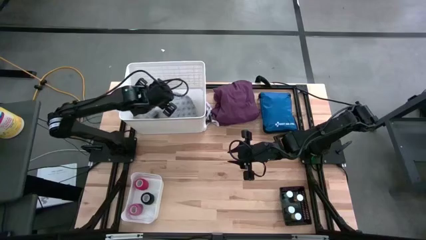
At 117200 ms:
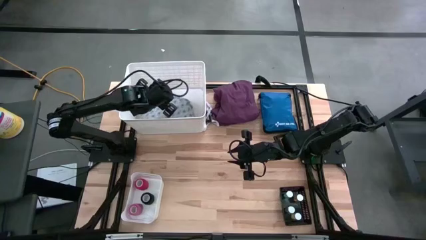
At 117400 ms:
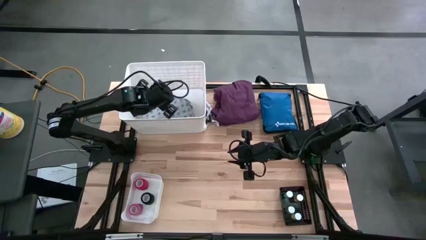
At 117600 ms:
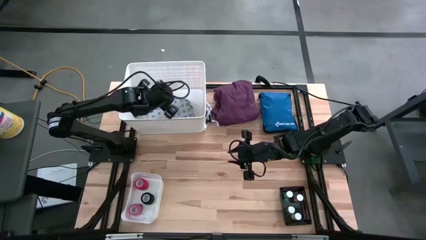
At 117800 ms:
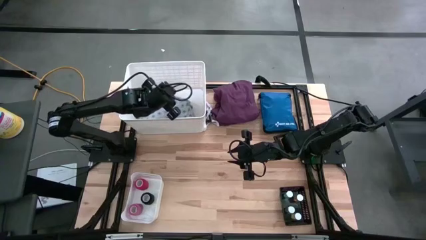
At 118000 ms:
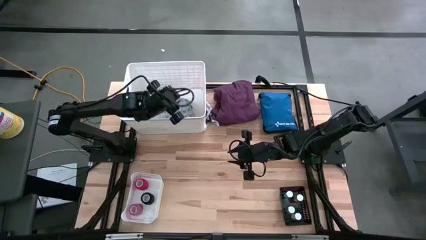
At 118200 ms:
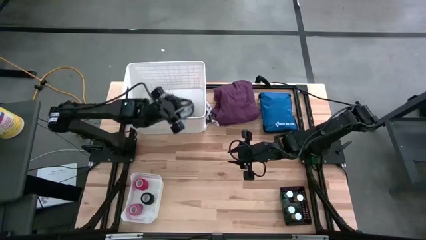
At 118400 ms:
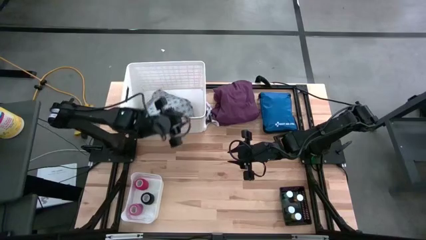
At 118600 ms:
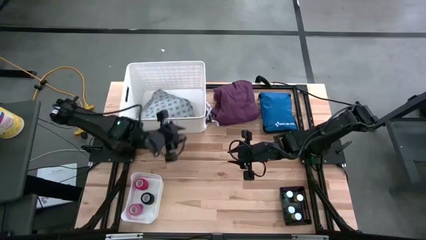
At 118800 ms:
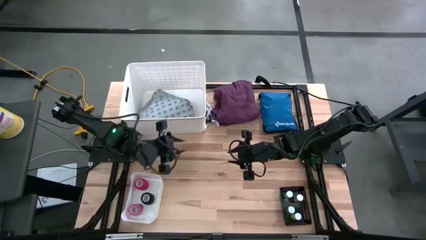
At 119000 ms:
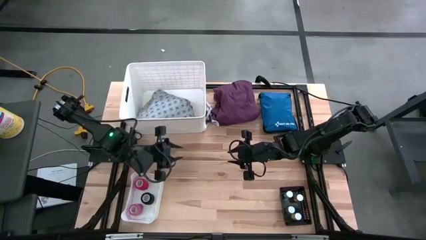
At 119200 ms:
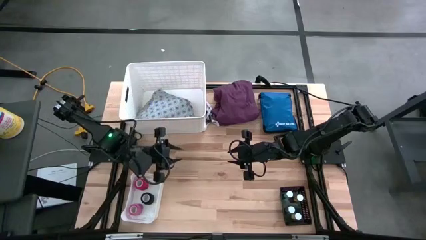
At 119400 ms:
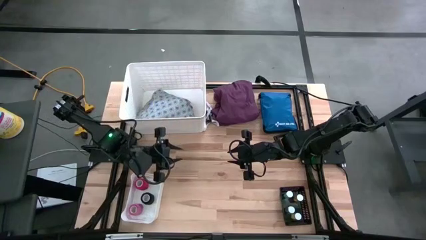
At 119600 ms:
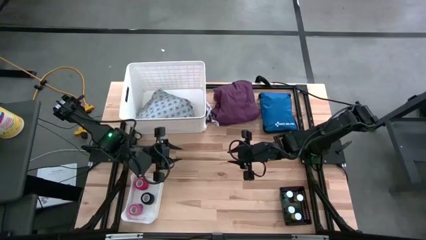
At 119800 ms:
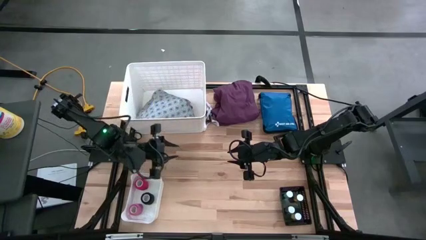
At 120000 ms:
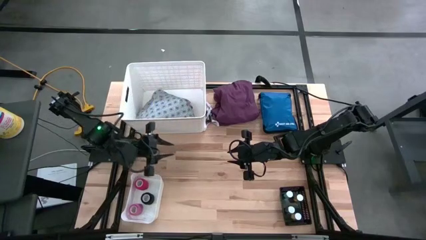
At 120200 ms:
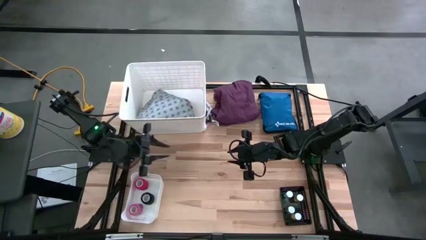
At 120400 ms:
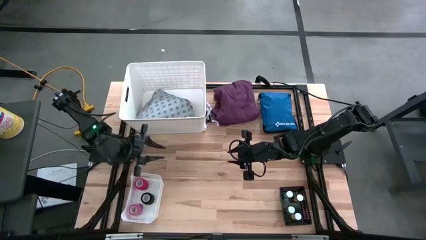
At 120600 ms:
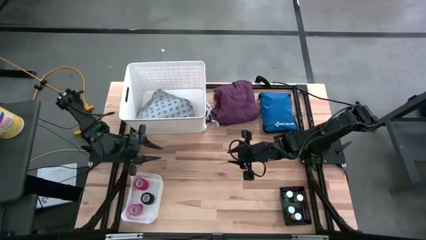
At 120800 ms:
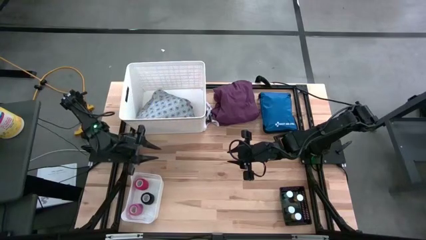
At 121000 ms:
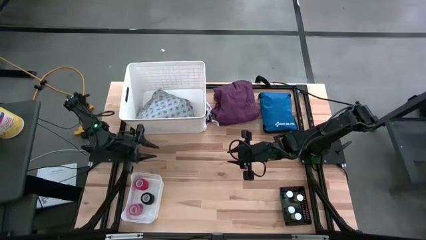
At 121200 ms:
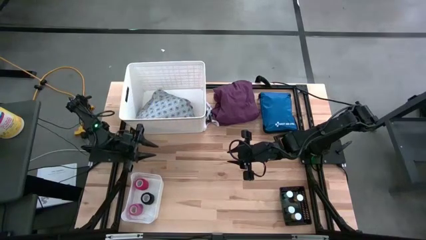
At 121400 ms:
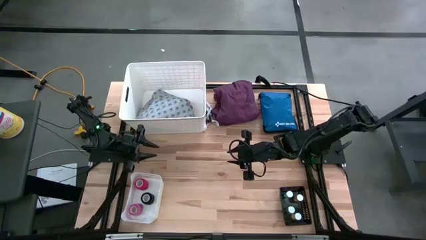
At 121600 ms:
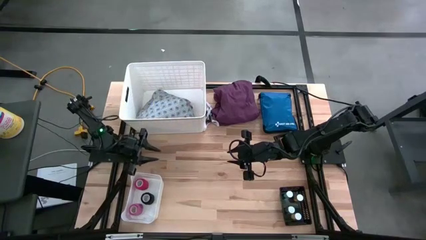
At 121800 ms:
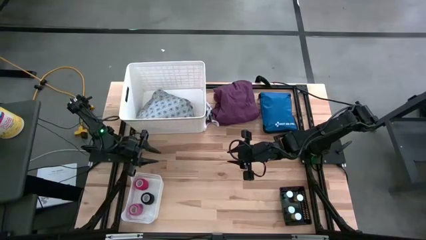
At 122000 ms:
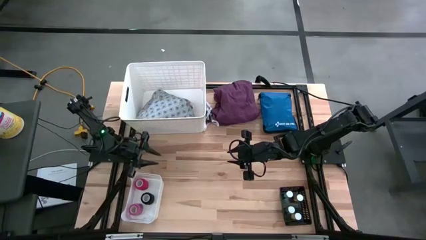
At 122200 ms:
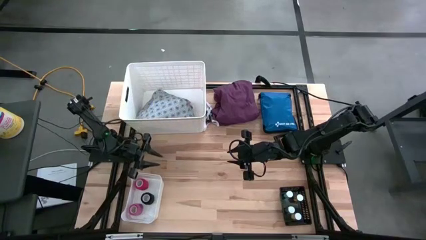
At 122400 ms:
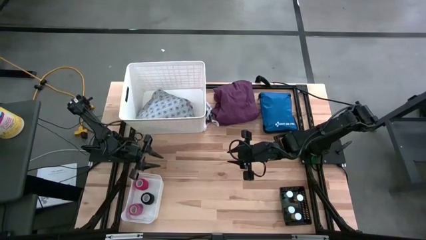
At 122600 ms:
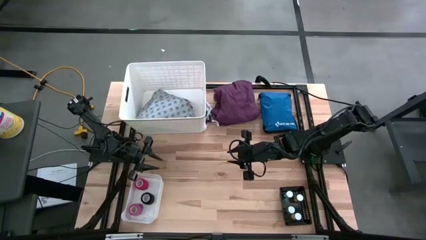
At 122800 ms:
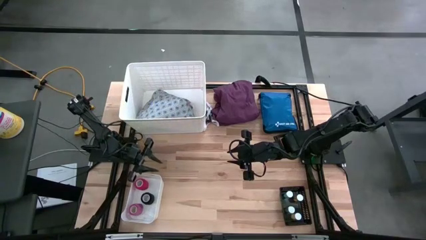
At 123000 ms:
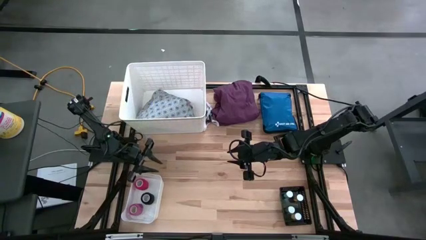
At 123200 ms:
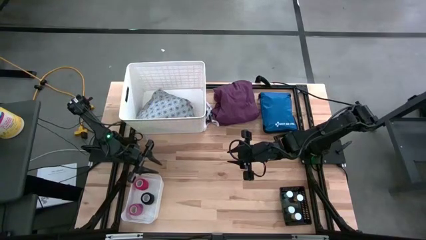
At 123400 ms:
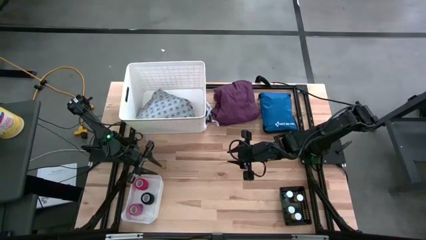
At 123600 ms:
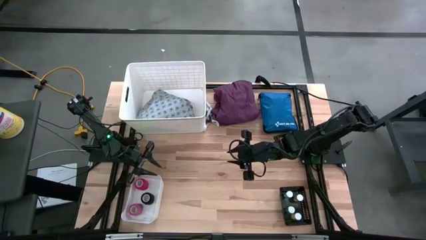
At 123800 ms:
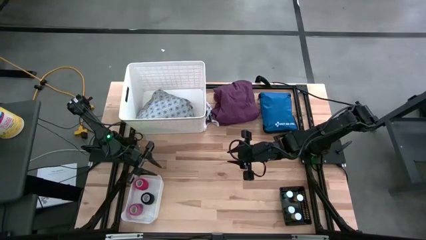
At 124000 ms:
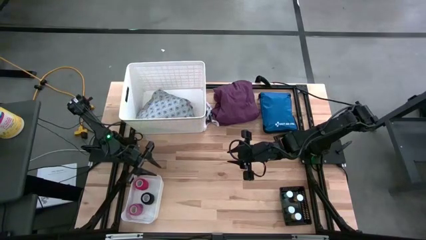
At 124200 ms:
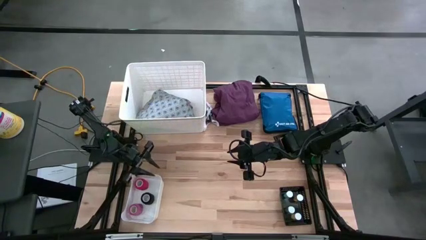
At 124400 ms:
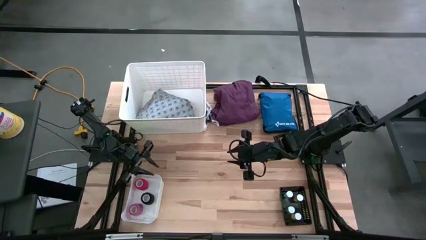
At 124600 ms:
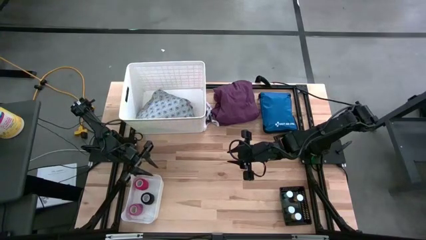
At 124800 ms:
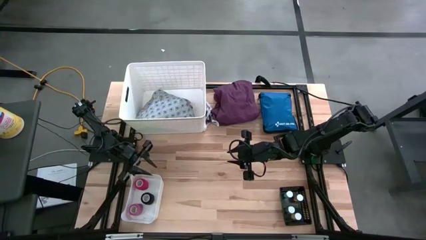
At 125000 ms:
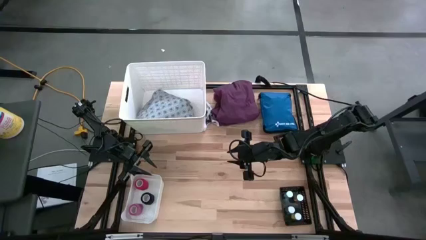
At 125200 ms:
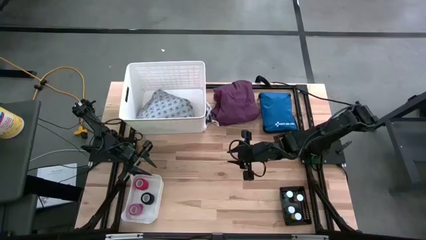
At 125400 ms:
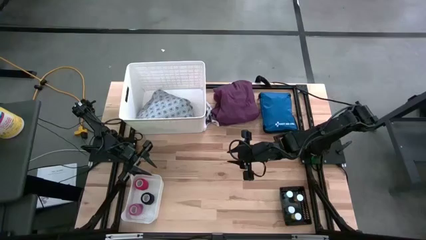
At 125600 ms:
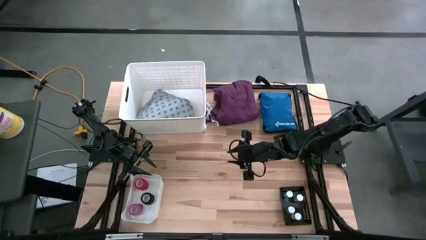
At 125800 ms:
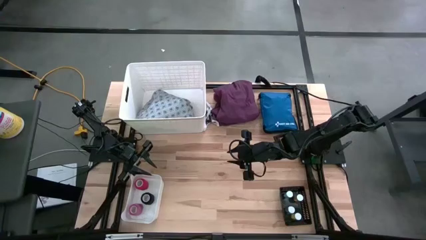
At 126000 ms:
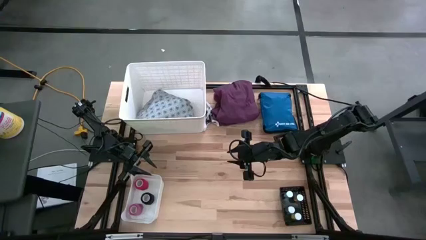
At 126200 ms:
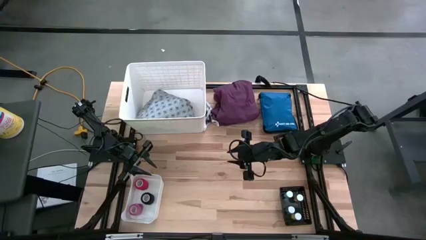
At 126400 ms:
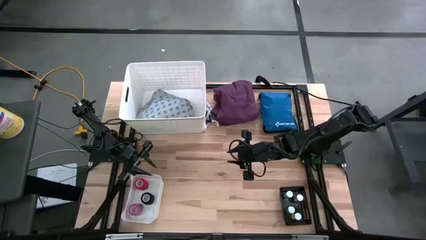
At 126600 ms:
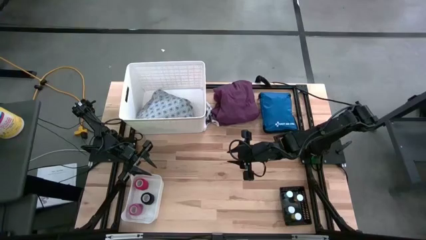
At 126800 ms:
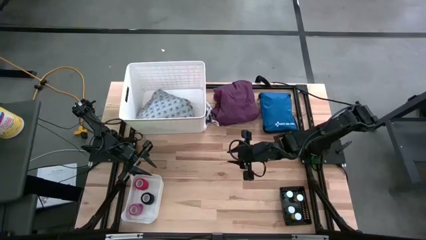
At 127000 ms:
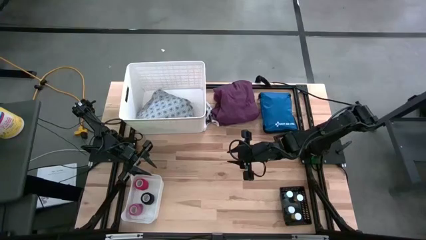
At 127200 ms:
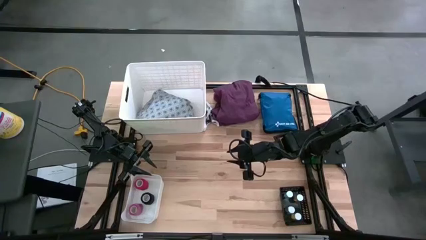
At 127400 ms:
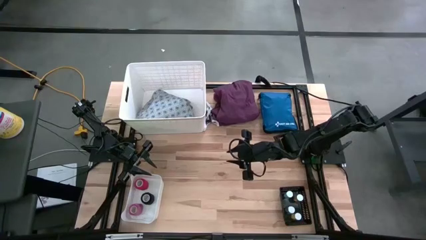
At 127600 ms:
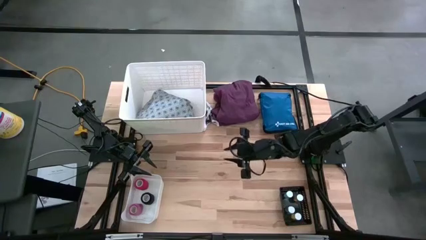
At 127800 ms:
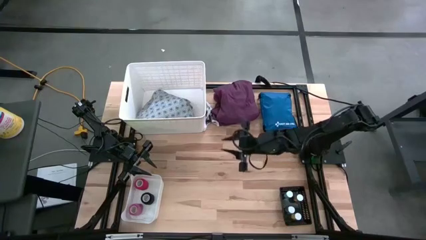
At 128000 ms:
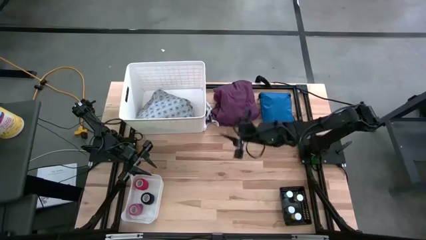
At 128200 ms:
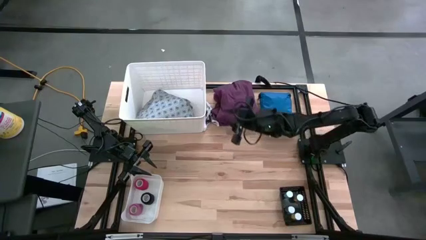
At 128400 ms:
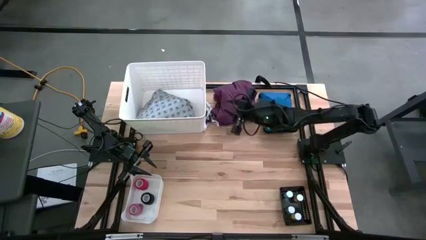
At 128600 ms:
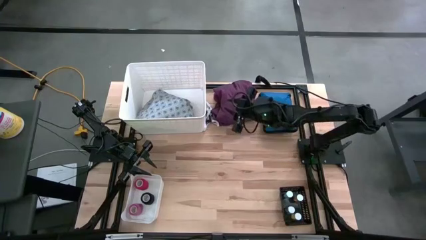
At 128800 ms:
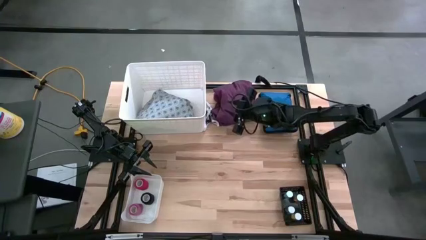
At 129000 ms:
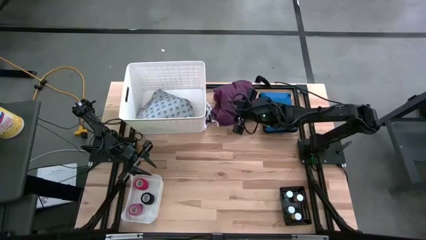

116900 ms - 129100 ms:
Task: Pick & place medical supplies in basket/bin
Put the violet patient gown into the top white bin
